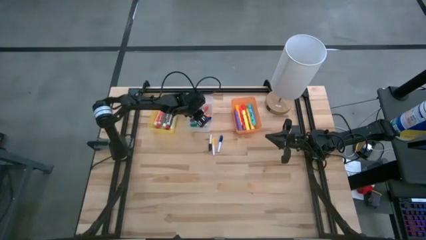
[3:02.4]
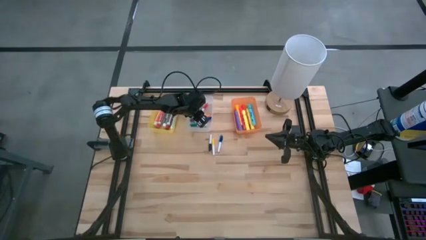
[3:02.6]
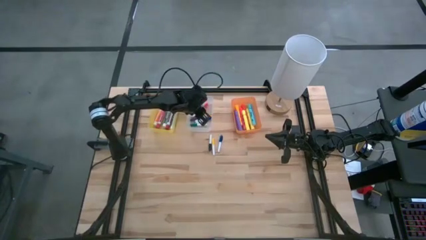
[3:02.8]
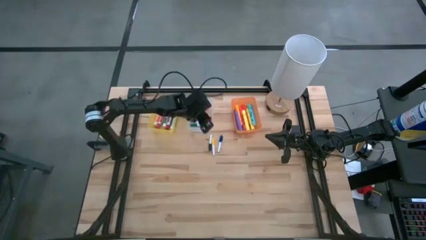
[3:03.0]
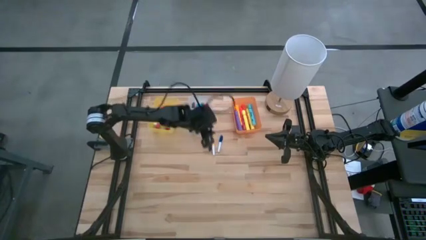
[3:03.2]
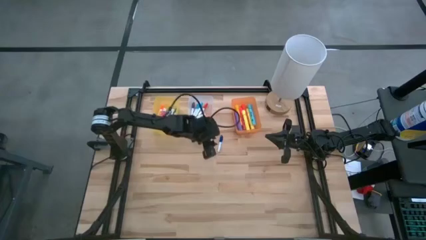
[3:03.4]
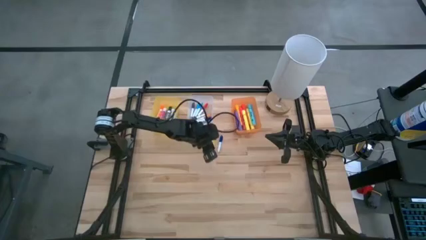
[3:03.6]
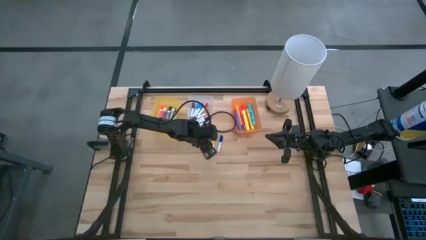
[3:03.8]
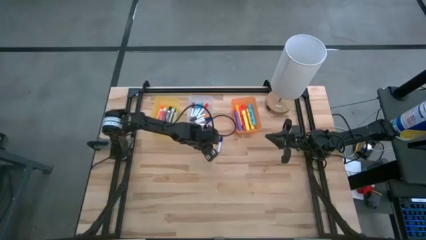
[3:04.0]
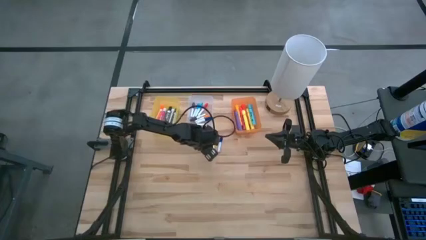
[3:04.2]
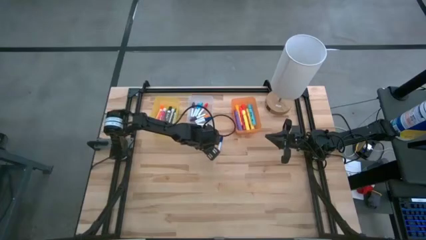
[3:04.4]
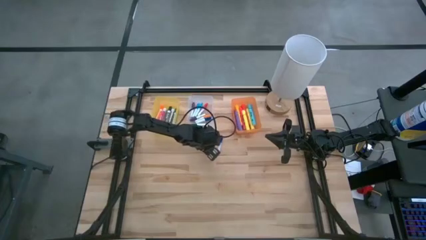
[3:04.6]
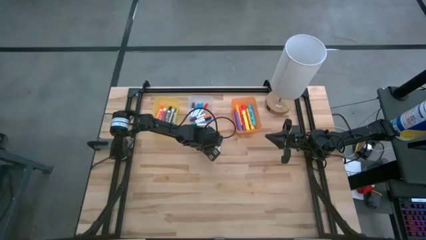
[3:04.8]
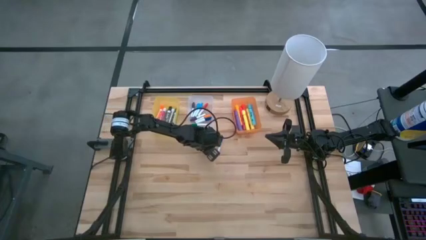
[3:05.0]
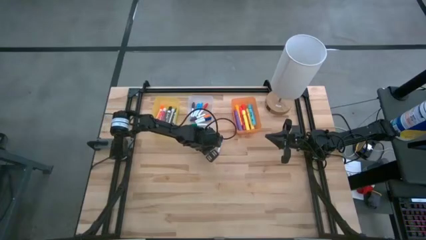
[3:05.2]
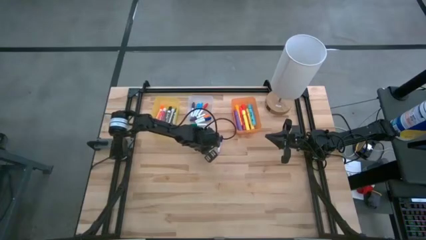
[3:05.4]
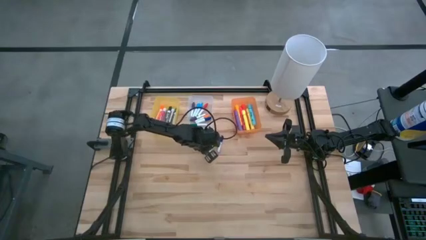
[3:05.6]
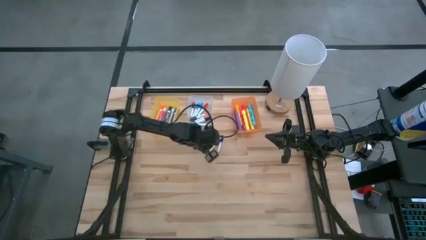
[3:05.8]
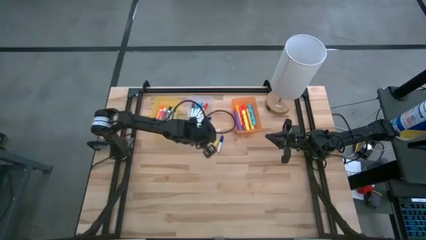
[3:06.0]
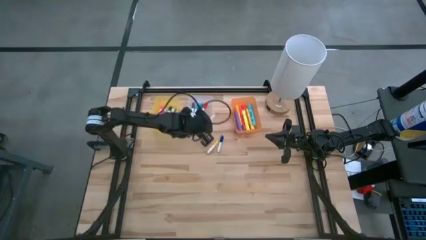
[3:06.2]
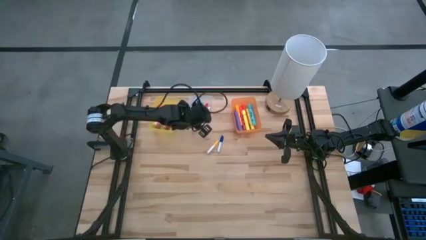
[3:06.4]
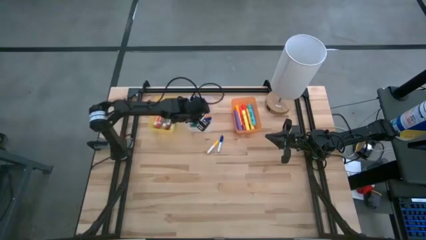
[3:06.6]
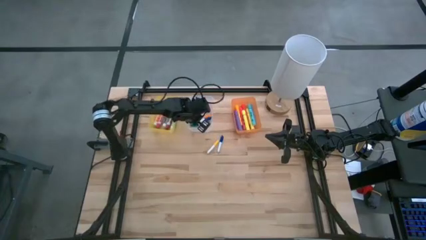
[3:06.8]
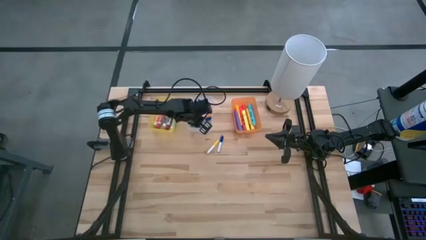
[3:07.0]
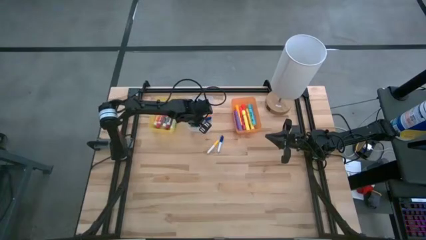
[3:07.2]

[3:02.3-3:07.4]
Task: Pick & Place Markers
Put the small black highlighter pen into the transparent bin

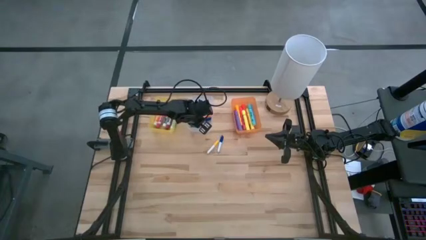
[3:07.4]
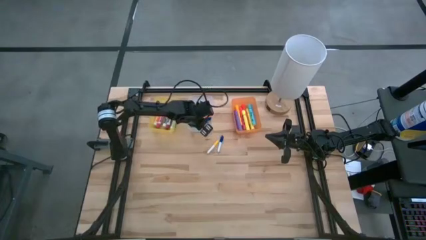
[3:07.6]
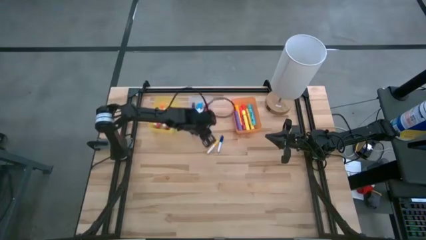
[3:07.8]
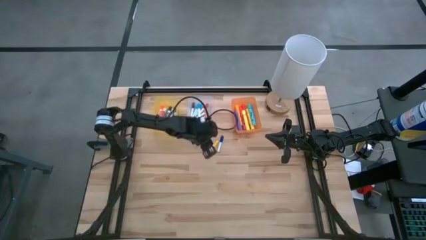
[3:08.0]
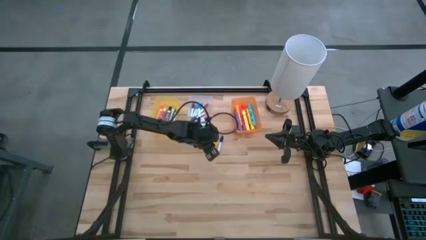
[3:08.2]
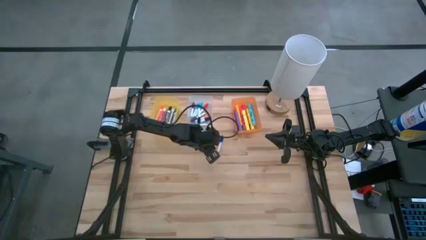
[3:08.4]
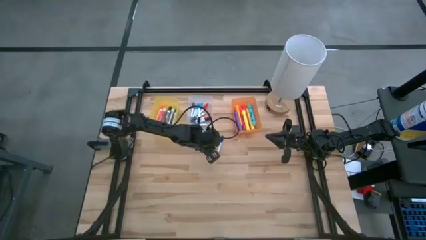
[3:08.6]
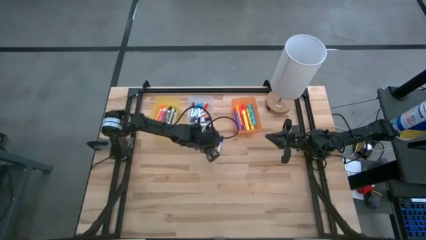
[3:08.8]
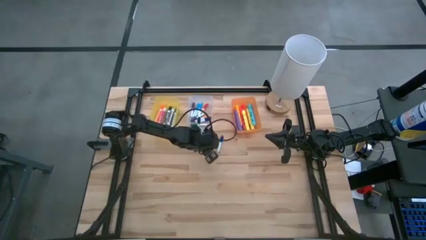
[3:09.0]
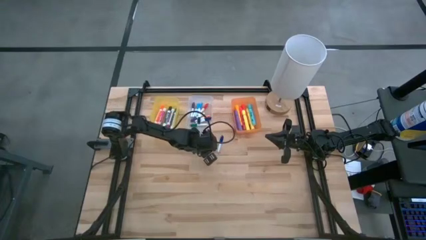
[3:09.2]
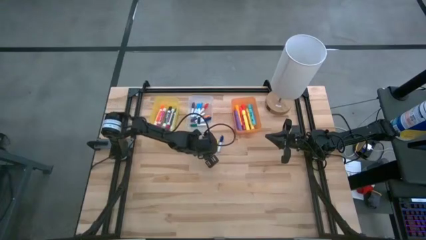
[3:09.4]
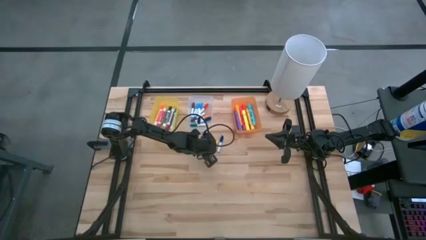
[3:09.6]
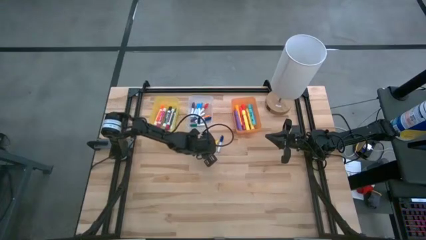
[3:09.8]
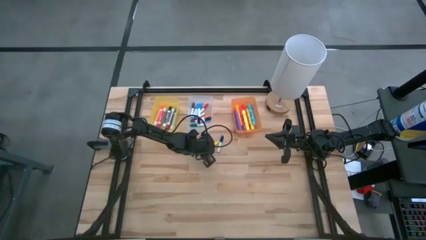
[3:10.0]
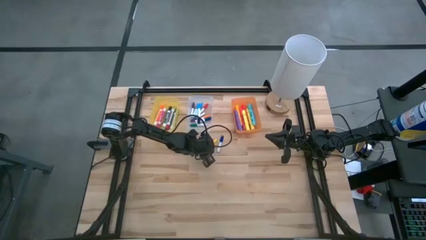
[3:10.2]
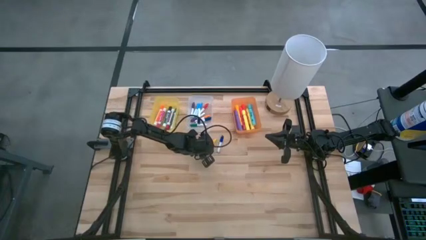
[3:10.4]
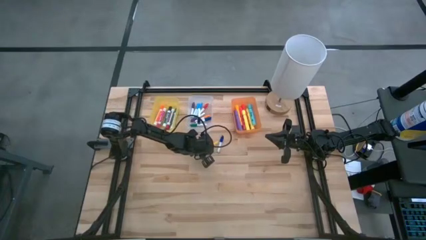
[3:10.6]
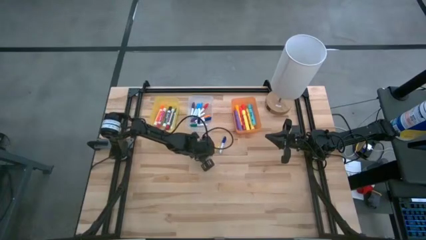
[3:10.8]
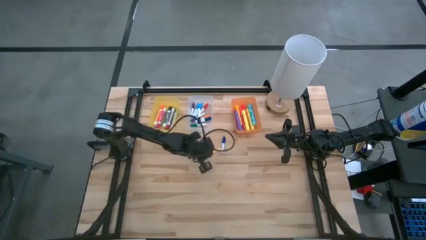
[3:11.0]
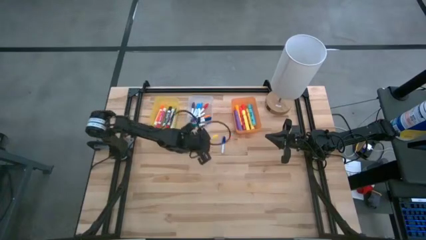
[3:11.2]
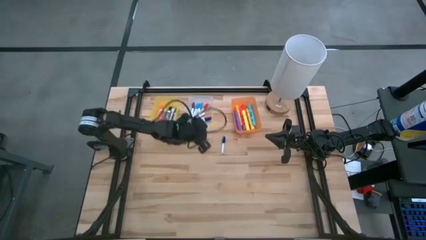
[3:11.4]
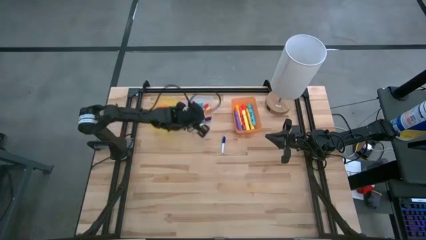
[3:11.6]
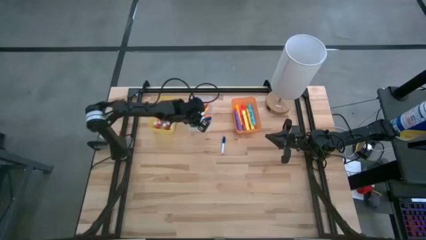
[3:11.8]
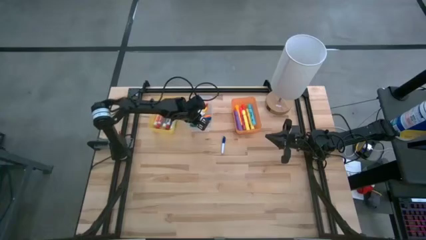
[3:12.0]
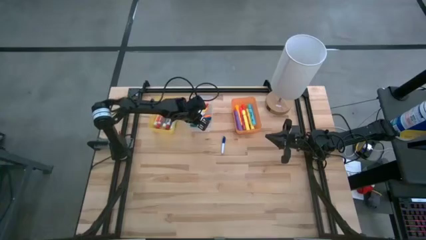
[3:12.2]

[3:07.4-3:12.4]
Put the small yellow highlighter pen into the transparent bin

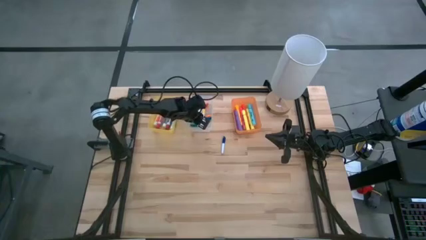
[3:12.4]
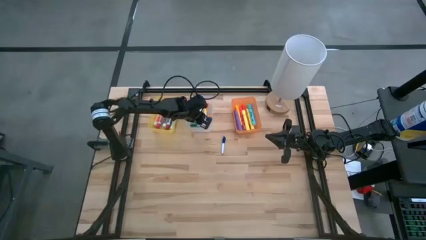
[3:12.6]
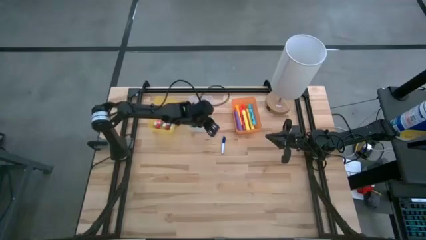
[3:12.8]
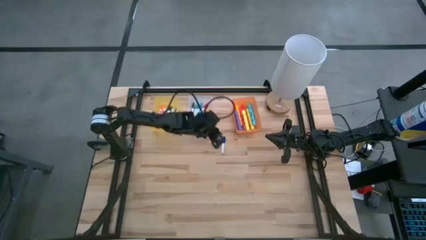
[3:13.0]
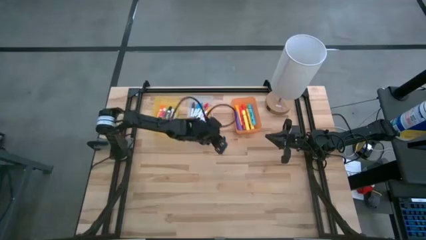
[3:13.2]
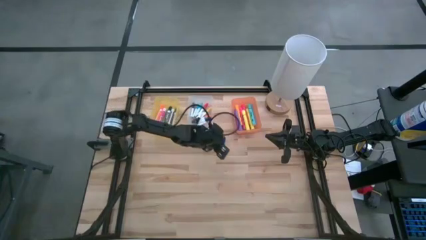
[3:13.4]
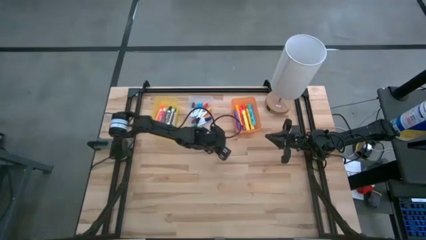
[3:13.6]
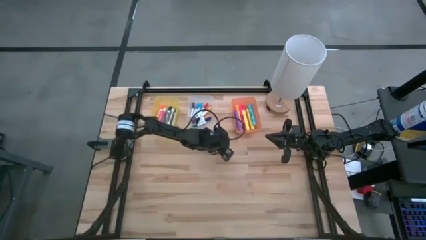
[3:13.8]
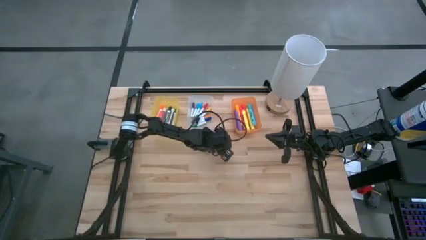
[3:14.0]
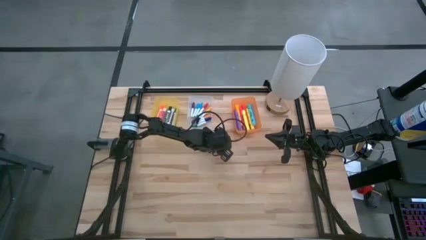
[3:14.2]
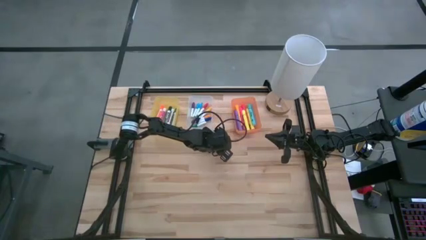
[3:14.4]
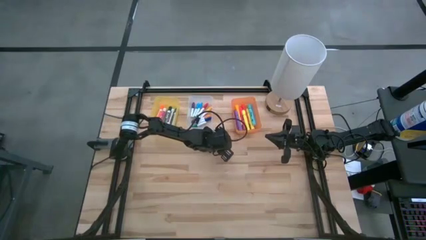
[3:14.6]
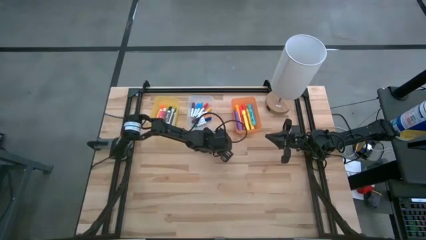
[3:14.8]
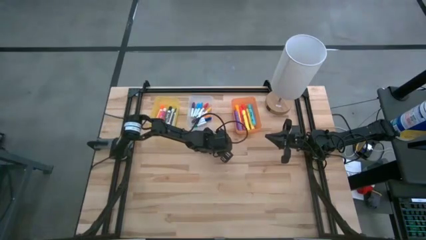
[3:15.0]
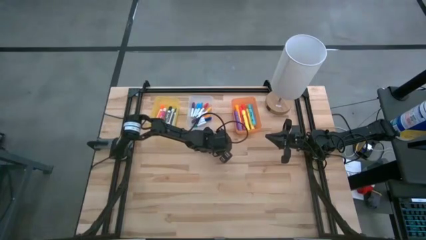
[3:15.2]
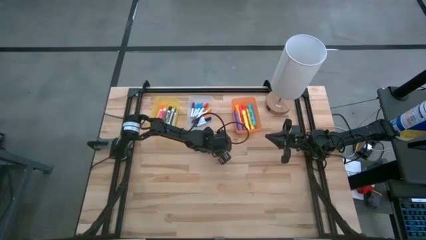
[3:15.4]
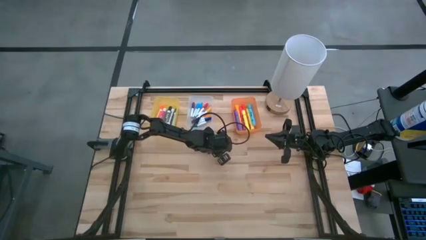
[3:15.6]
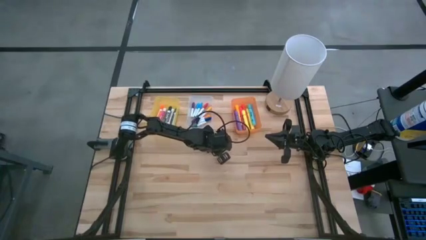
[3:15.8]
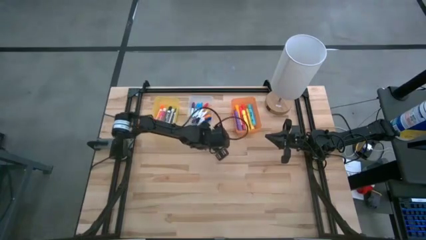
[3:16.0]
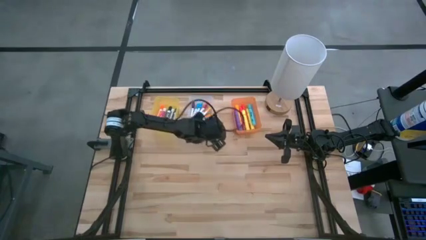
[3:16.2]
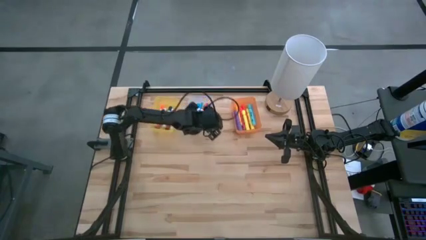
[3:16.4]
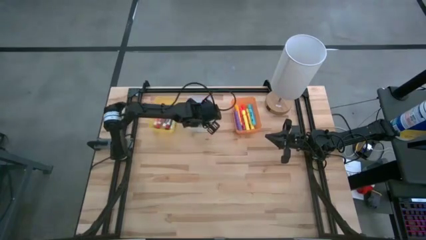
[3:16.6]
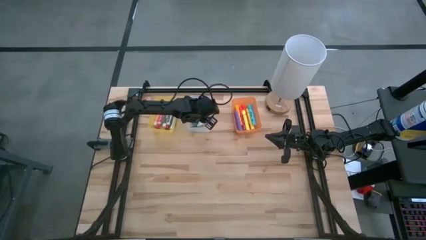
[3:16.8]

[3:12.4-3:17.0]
Put the small blue highlighter pen into the transparent bin

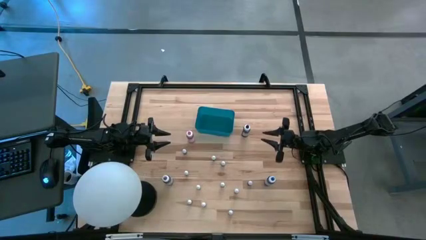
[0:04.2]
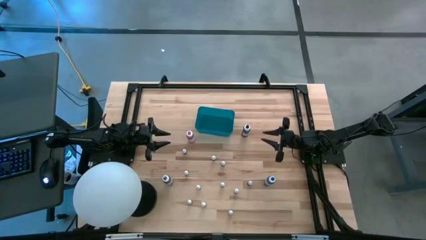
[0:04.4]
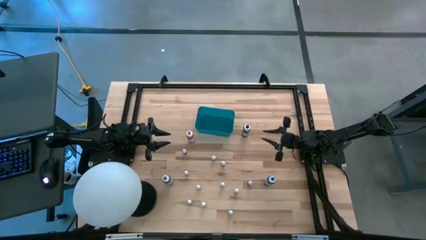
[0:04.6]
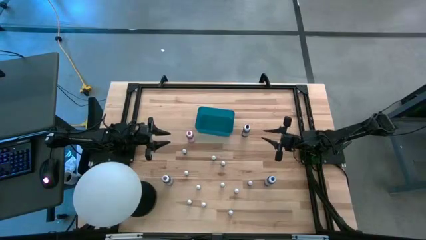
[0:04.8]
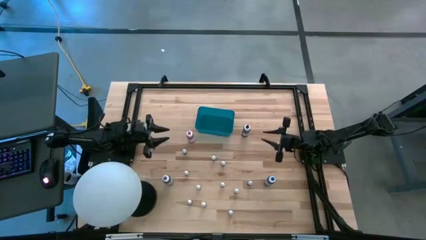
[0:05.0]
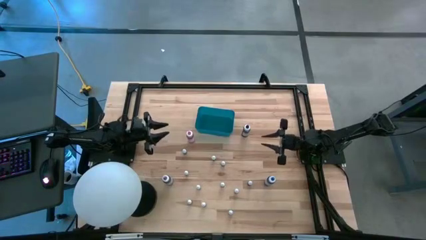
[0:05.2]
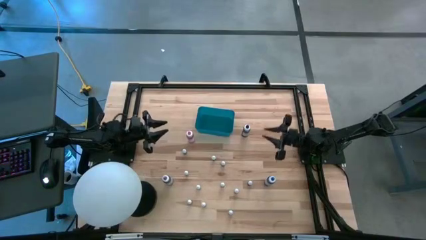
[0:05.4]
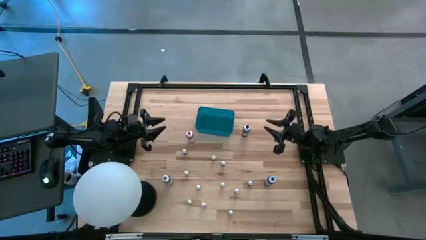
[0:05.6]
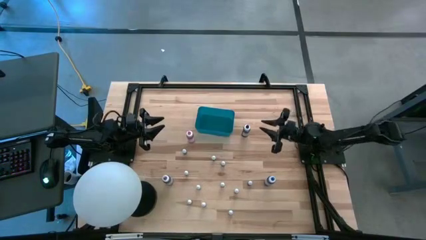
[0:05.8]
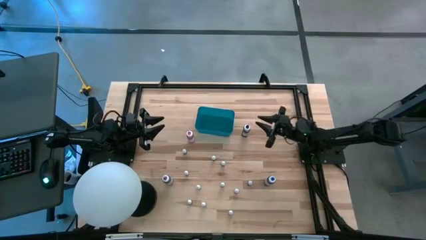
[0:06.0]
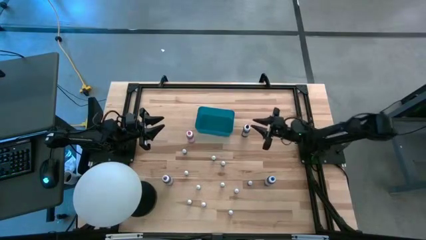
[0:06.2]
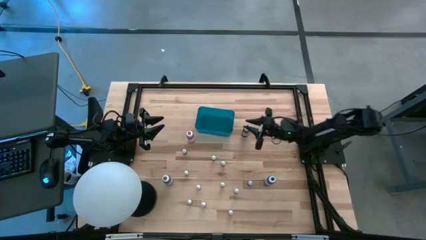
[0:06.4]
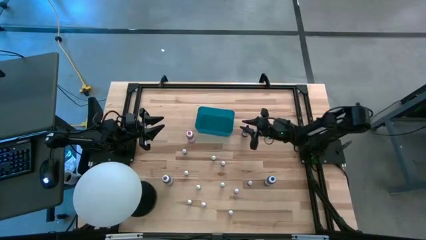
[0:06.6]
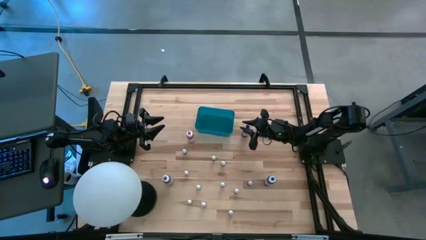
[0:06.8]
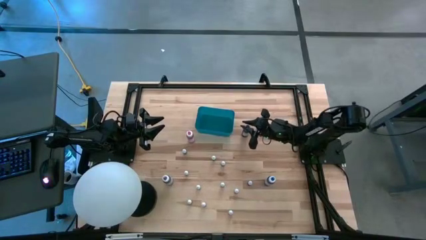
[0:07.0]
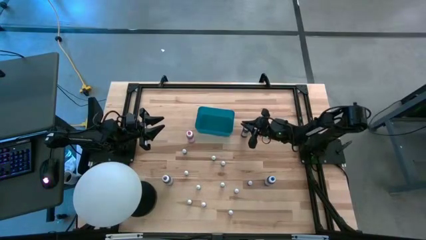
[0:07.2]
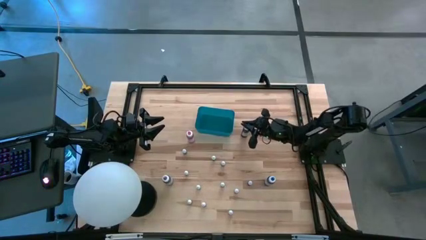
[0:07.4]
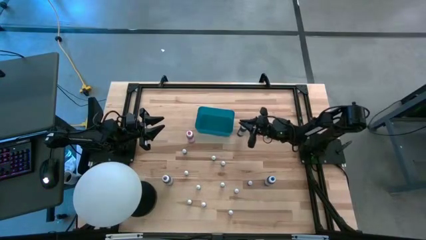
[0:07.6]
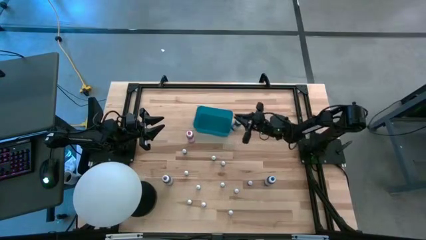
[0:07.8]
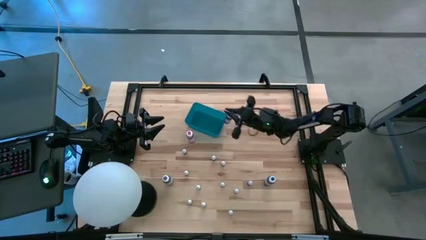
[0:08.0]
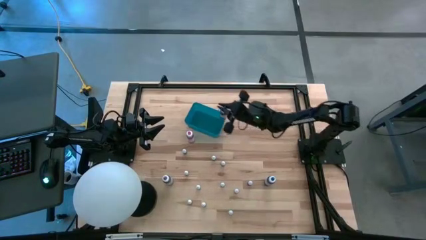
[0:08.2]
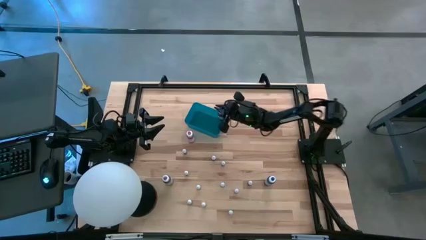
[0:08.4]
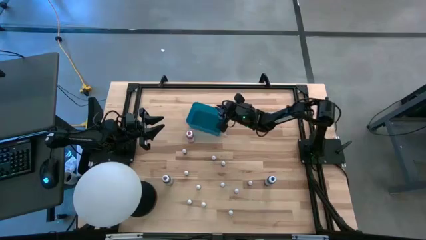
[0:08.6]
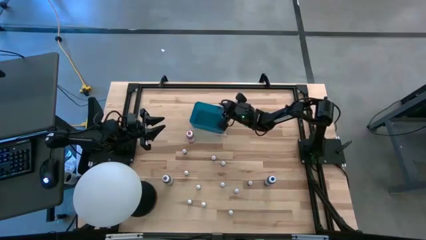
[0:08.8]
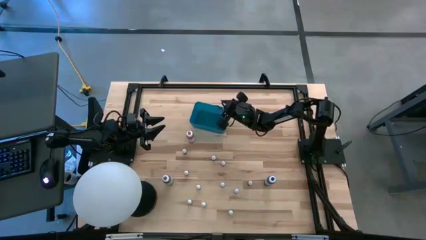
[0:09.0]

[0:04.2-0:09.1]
Task: Pick & Place food coloring
Put the black food coloring bottle into the blue bin
